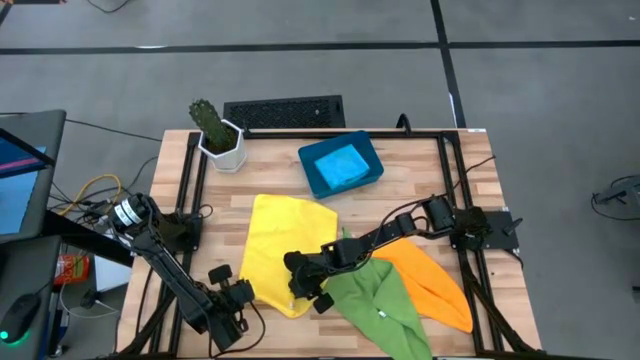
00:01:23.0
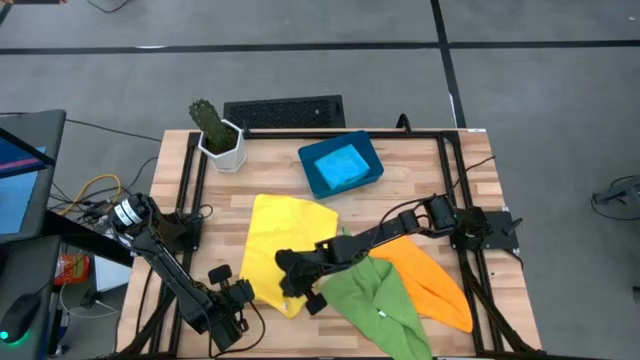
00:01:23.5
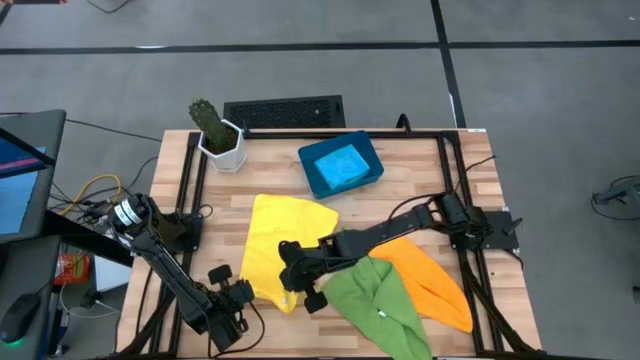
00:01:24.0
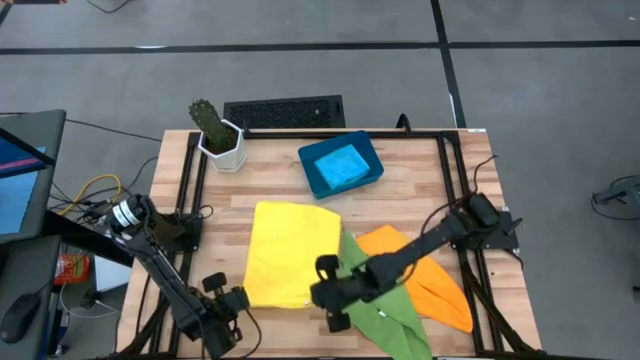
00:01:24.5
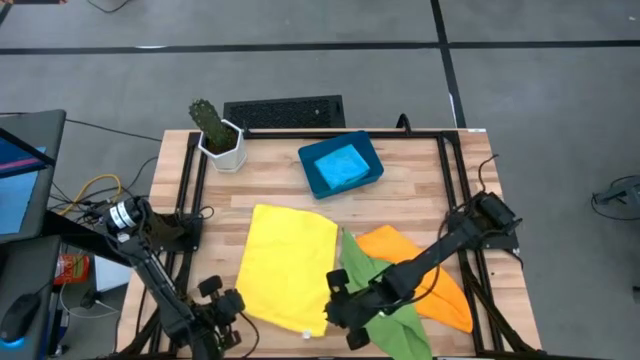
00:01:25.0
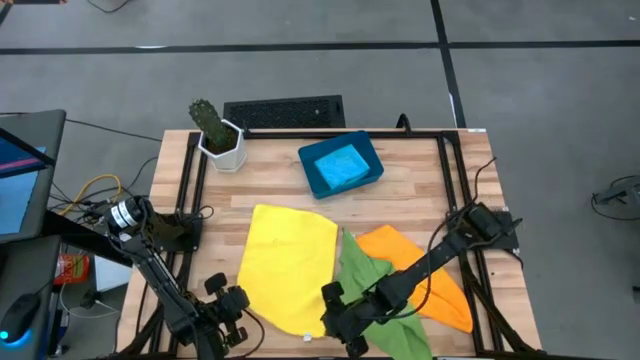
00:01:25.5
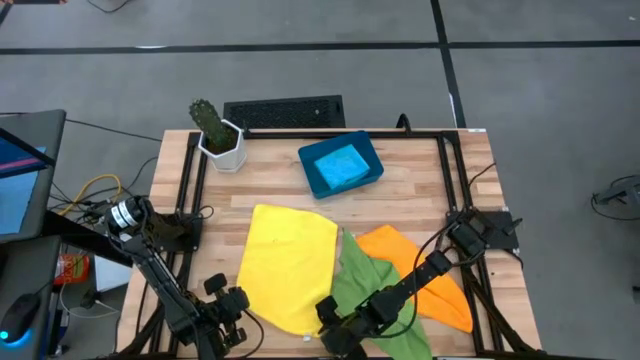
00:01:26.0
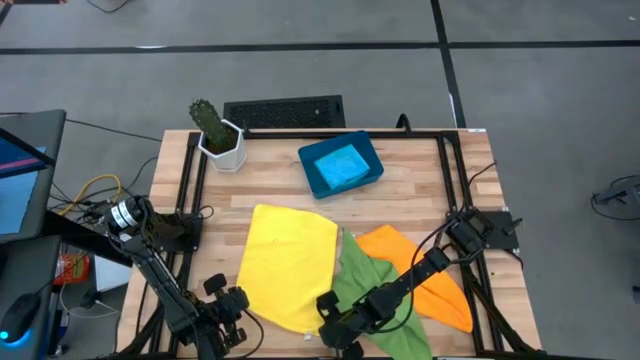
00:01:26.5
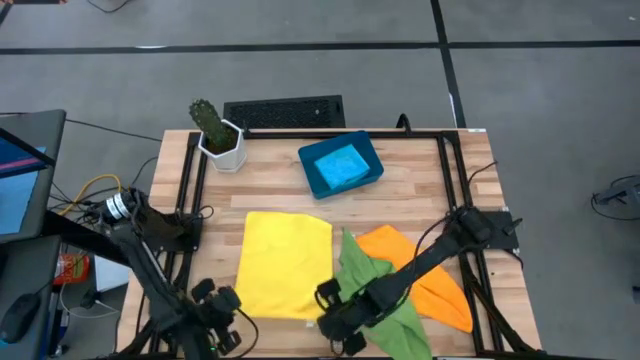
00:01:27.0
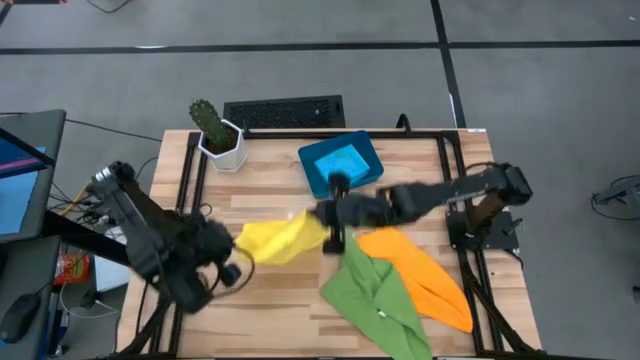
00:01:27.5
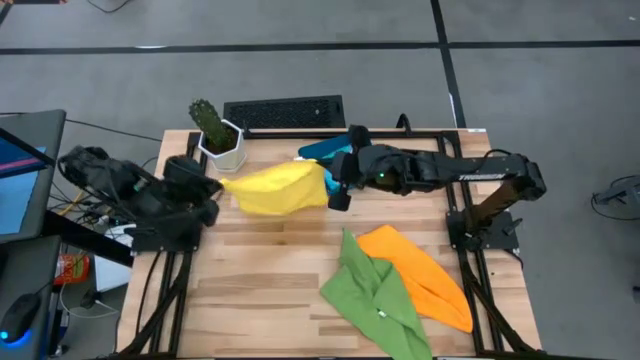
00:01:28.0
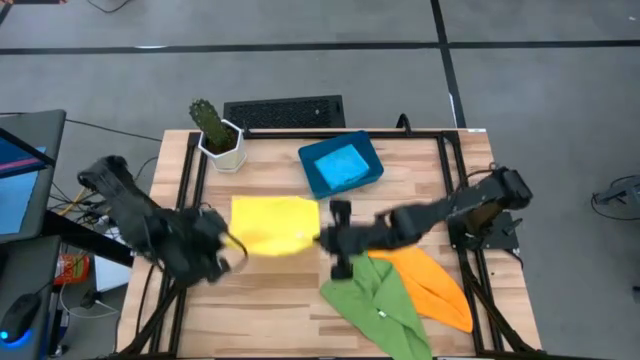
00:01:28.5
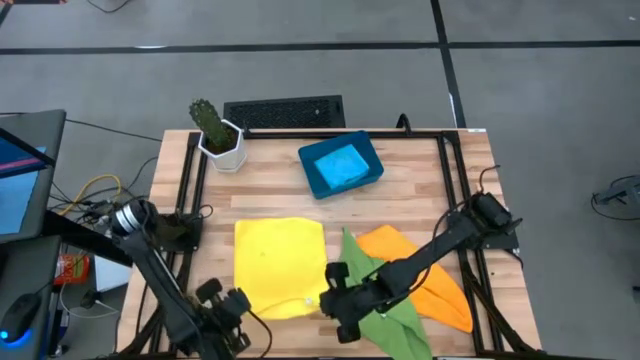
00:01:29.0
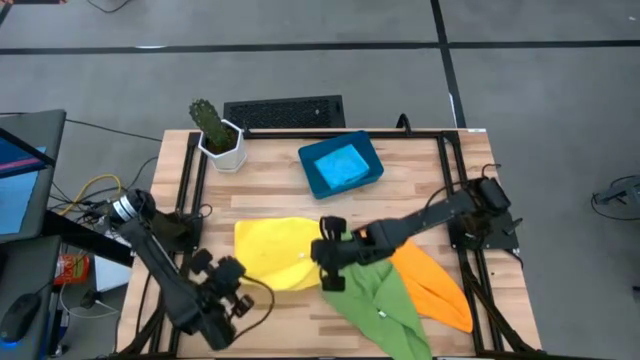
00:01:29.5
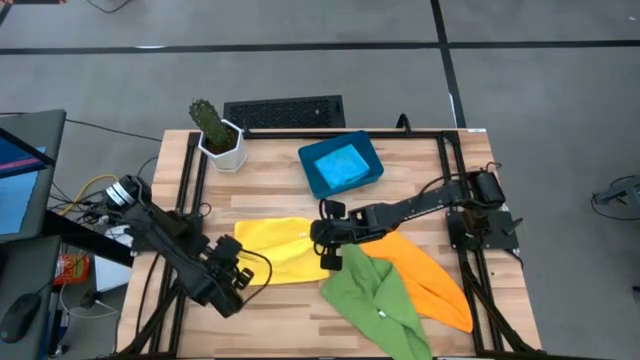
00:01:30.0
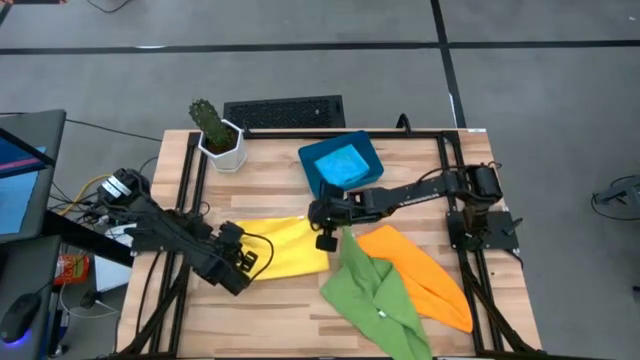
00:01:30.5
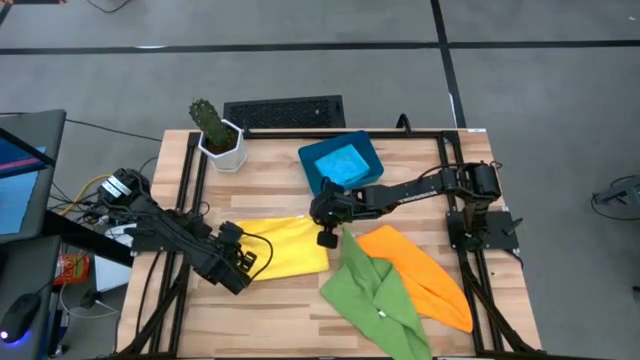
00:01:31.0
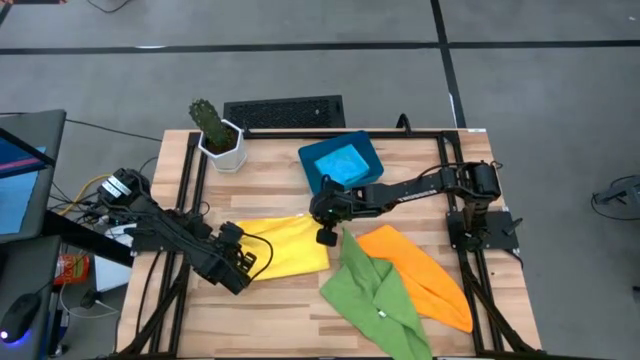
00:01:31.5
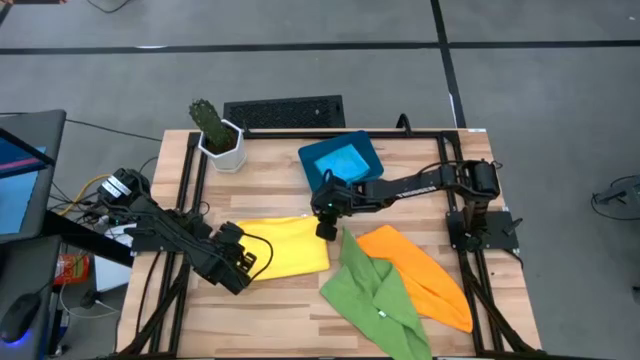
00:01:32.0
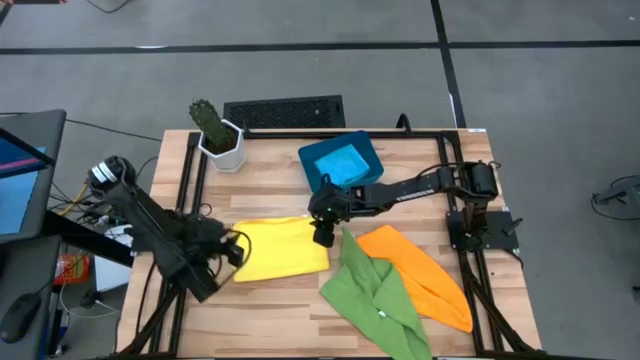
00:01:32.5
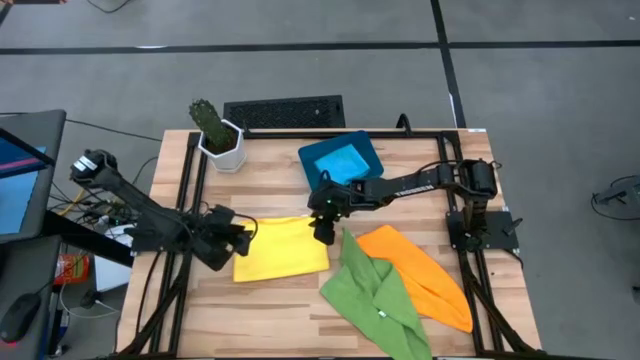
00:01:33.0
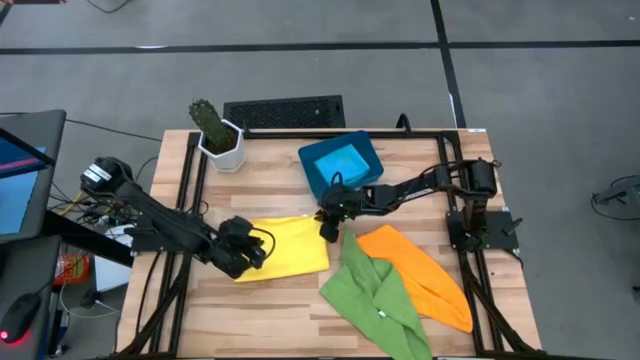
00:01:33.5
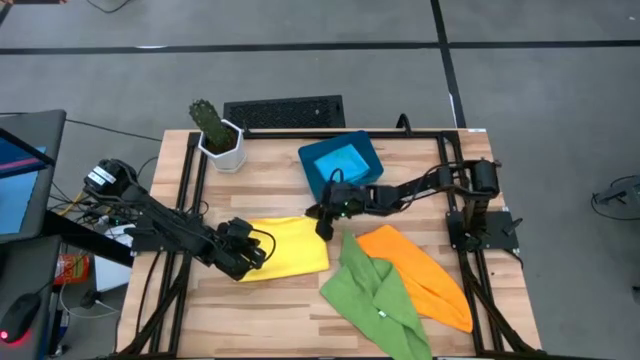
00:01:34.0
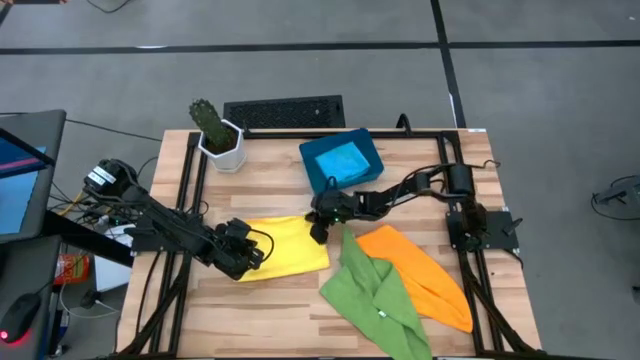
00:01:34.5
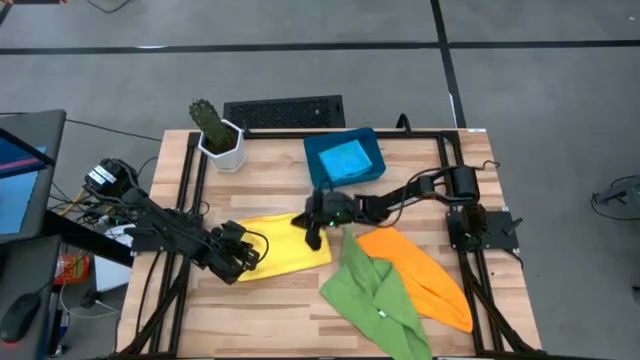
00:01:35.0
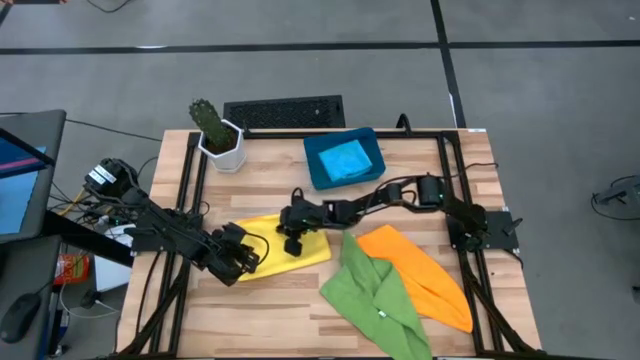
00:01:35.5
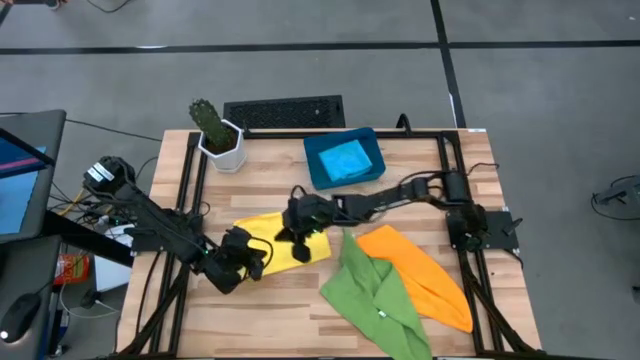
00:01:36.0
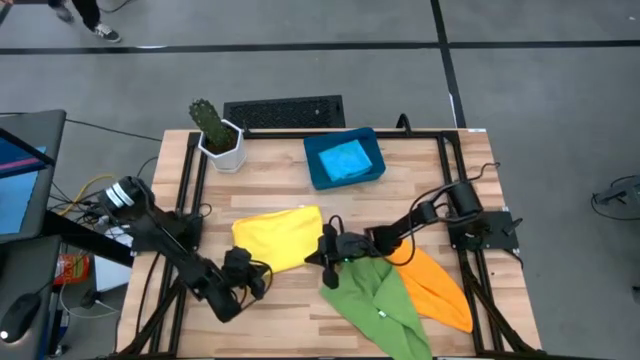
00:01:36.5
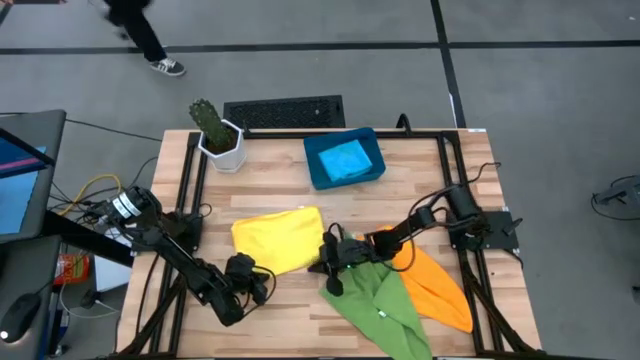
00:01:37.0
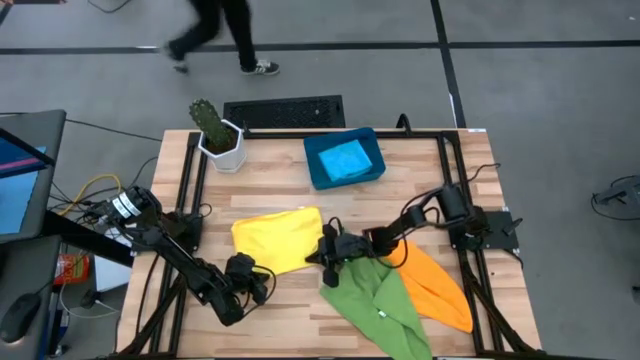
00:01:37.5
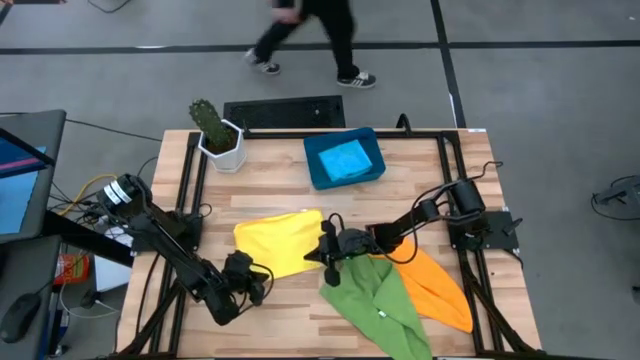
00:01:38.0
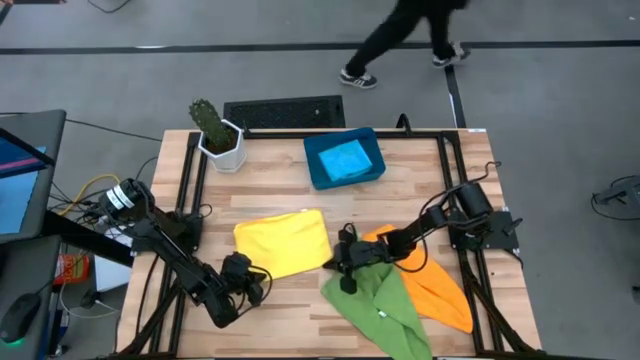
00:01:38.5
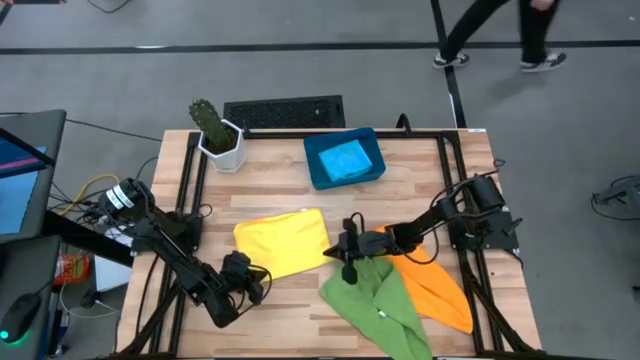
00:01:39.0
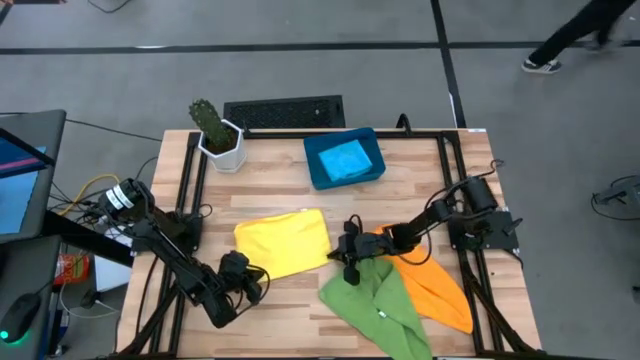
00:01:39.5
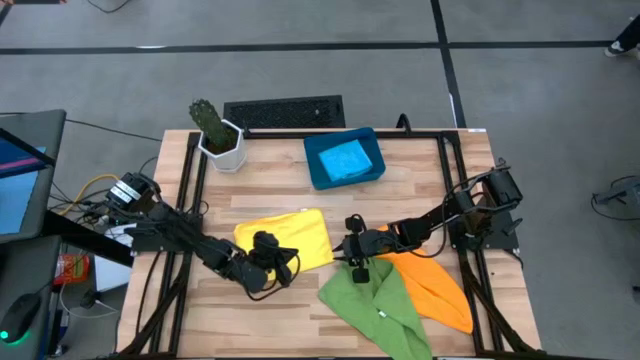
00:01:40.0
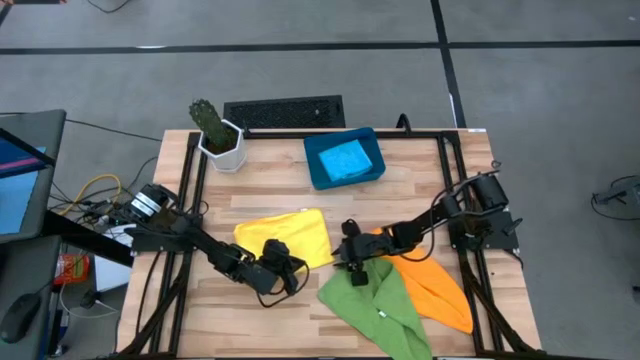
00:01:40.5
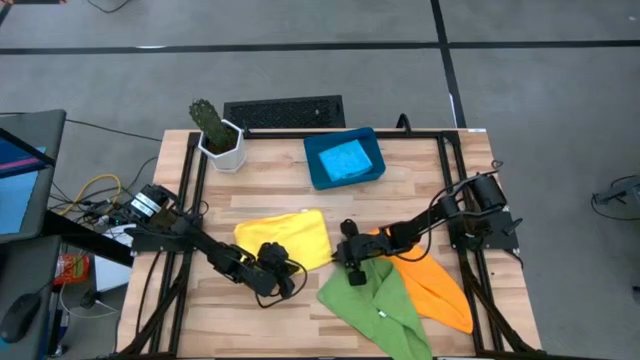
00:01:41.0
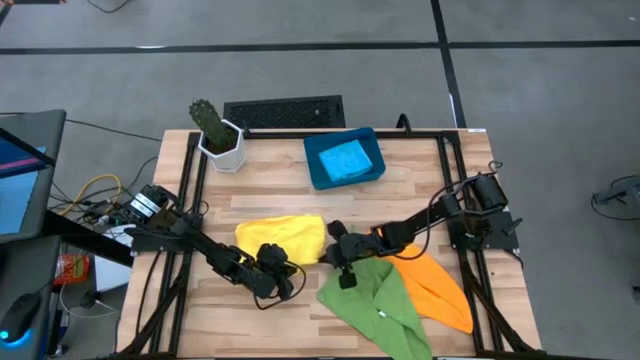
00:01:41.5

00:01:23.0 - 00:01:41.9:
Task: Fold microfiber towels
Fold the yellow microfiber cloth

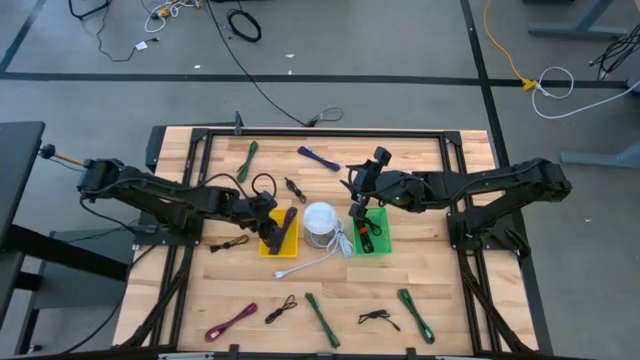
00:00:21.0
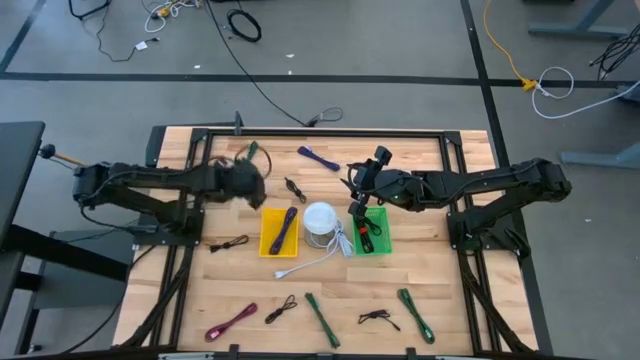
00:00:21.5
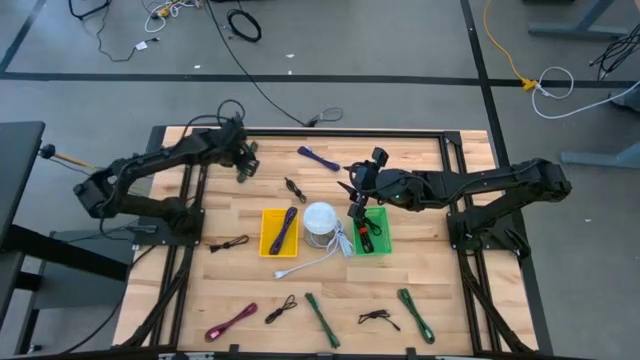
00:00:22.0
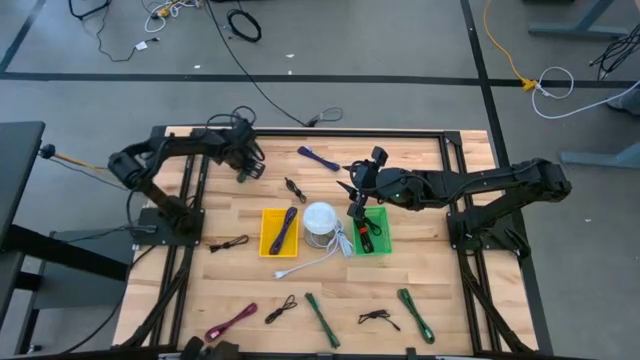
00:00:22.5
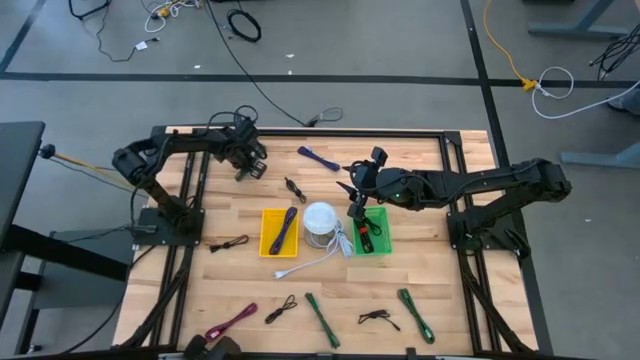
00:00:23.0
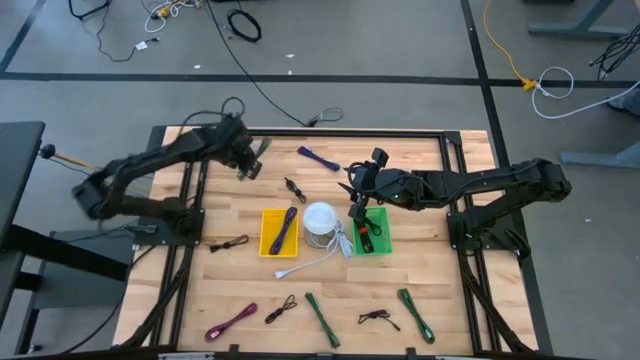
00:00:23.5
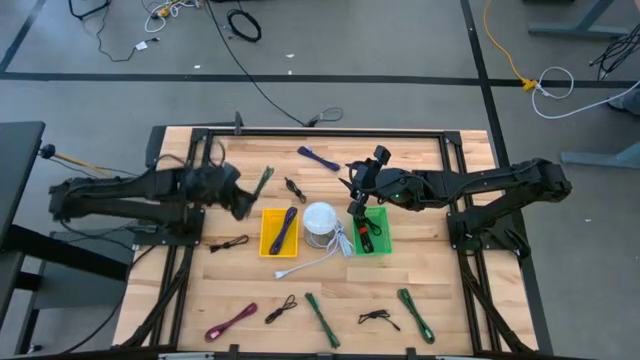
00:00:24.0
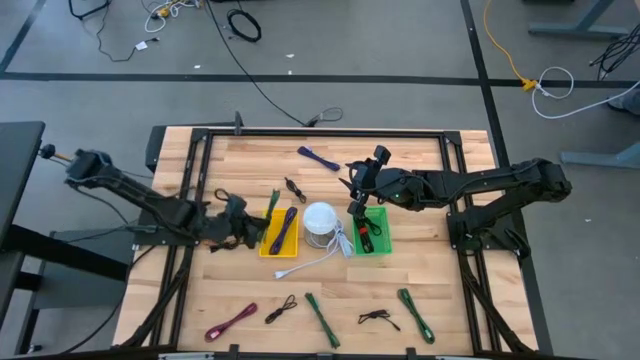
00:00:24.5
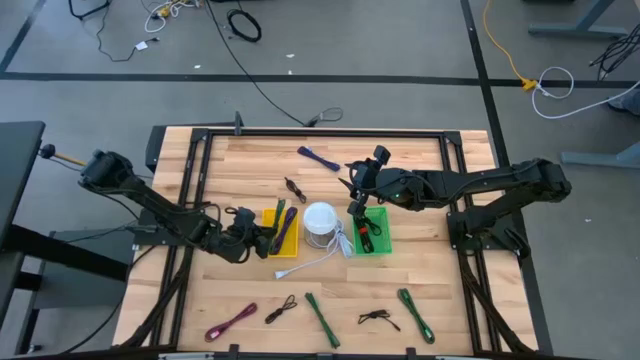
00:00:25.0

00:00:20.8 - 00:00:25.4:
Task: Pick & Place USB Port
Put the black green charger cable into the yellow basket
